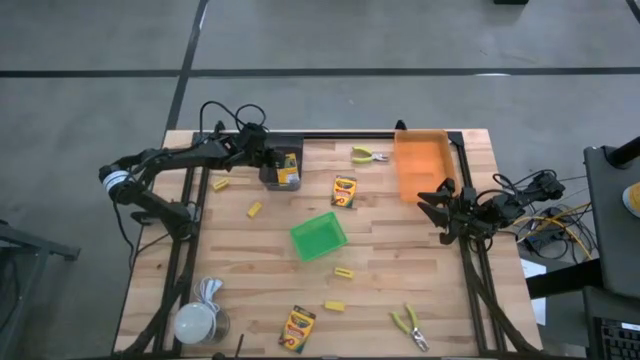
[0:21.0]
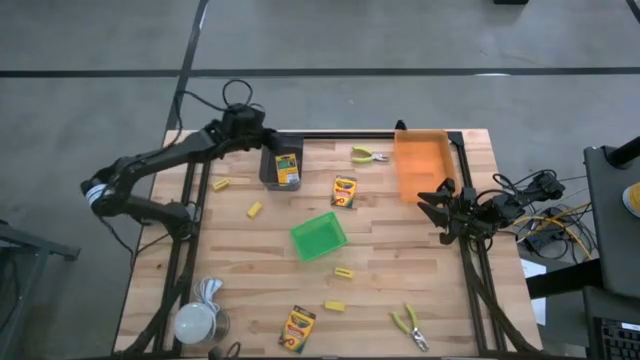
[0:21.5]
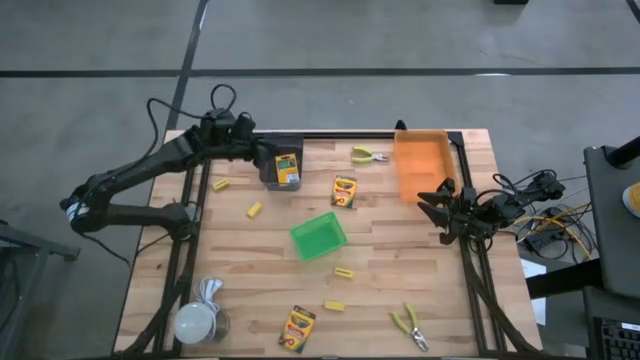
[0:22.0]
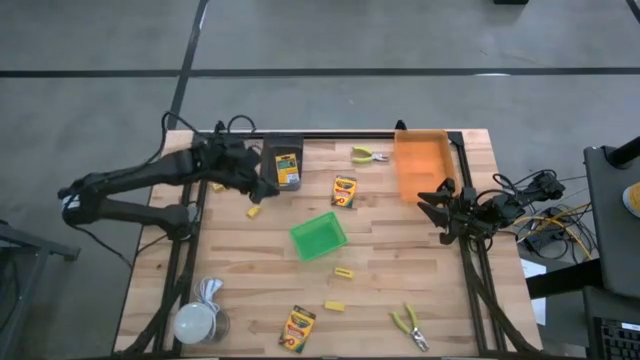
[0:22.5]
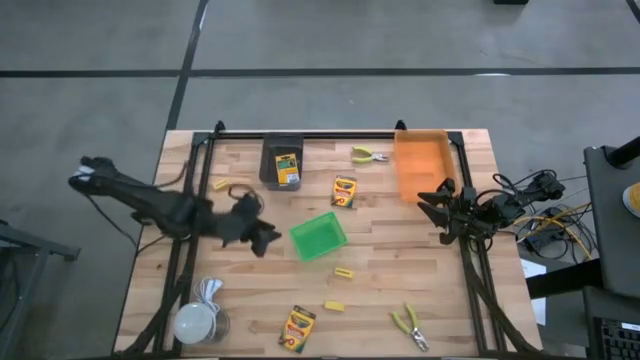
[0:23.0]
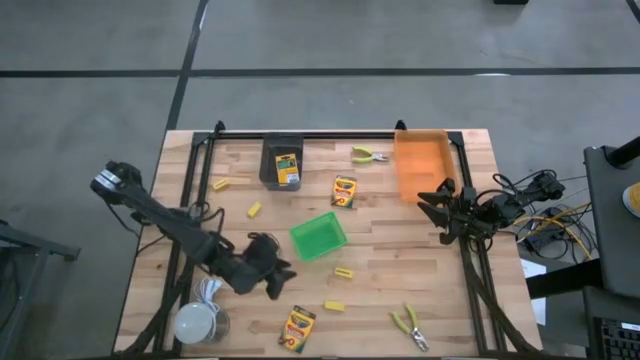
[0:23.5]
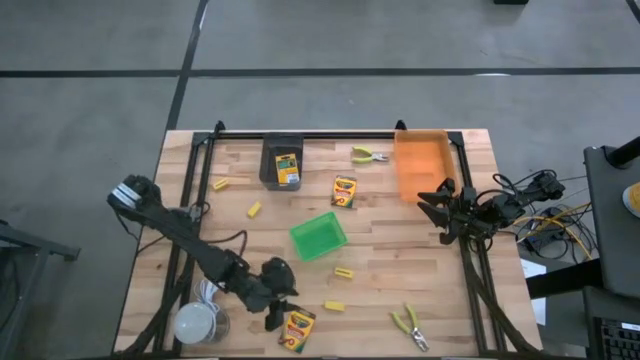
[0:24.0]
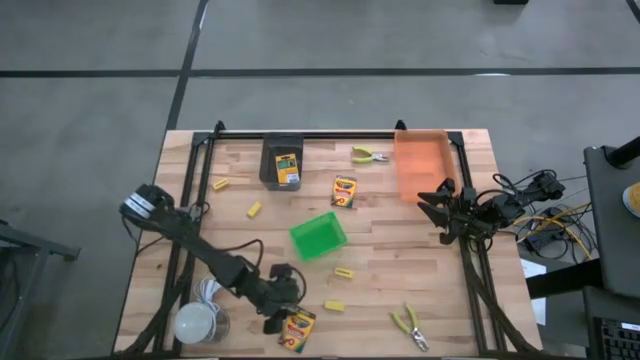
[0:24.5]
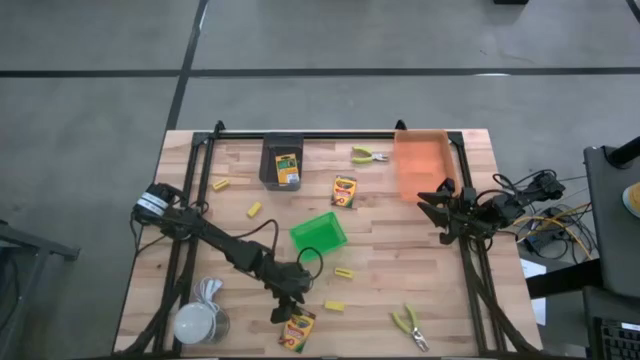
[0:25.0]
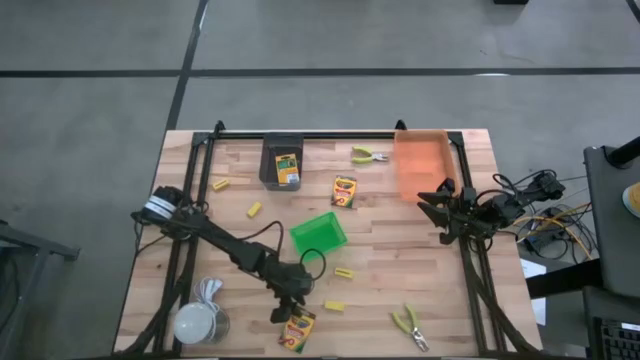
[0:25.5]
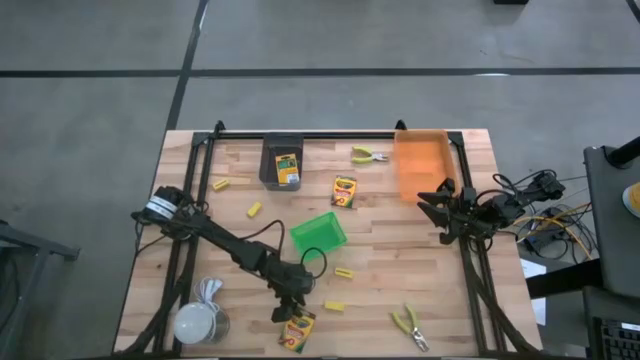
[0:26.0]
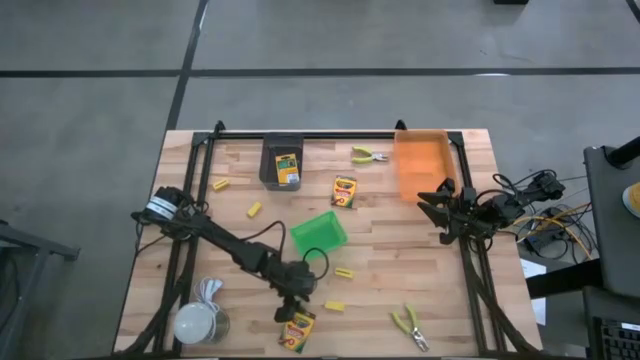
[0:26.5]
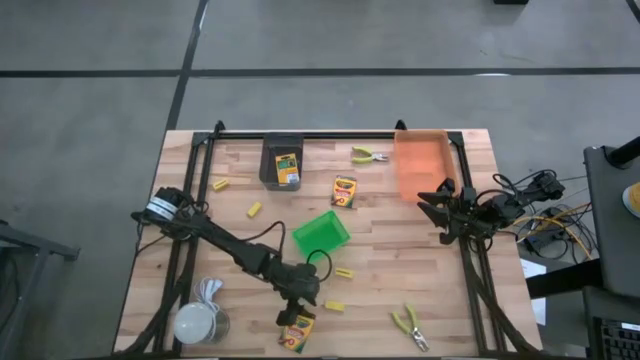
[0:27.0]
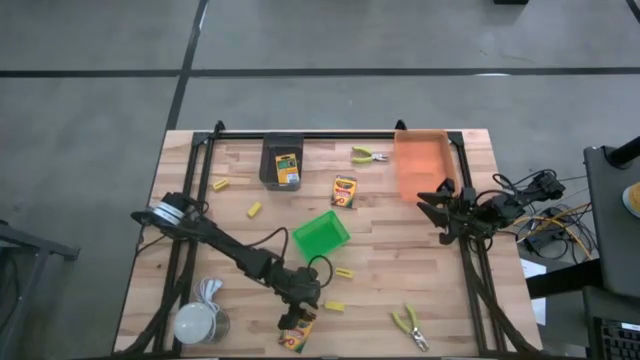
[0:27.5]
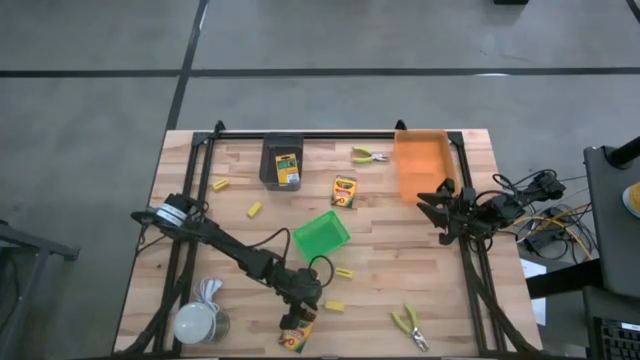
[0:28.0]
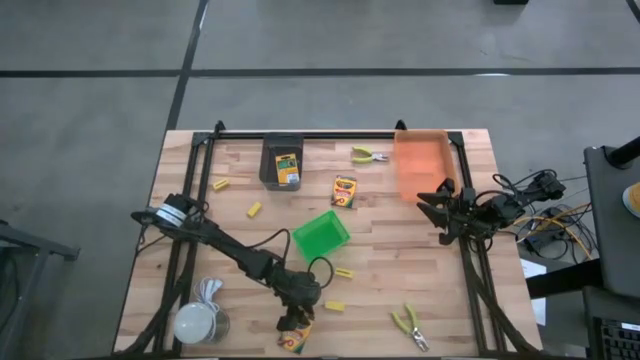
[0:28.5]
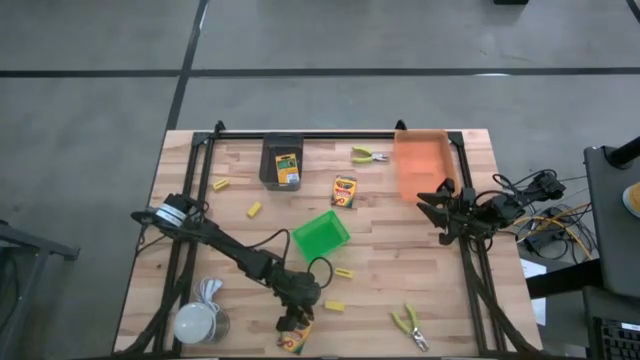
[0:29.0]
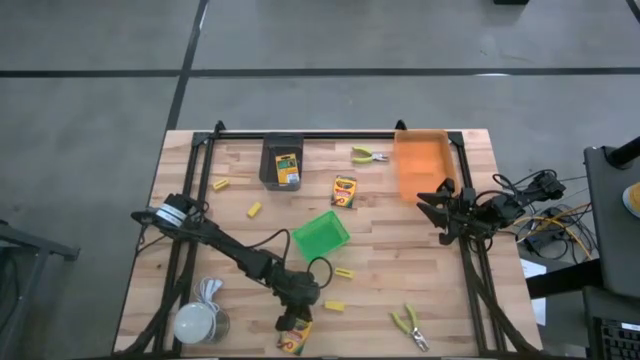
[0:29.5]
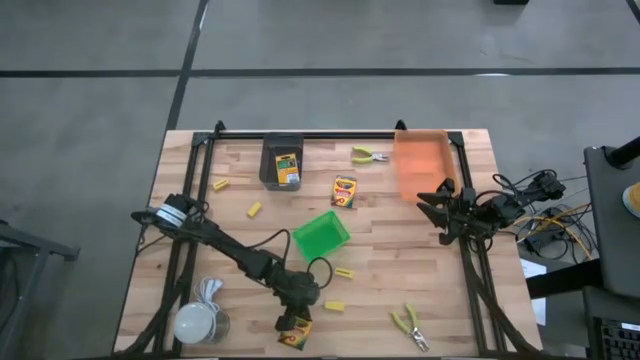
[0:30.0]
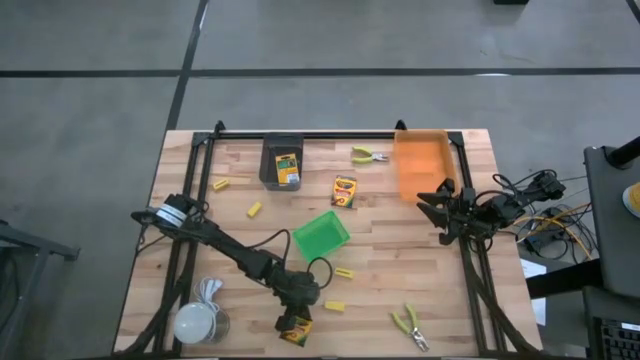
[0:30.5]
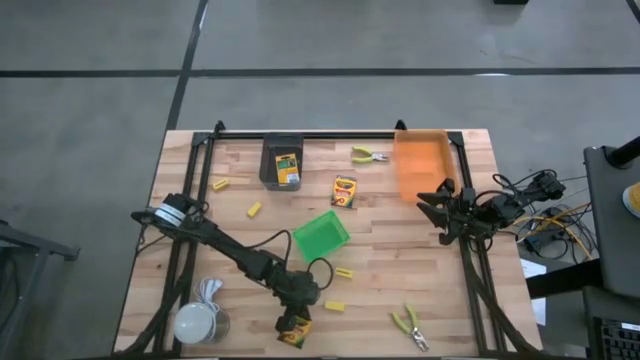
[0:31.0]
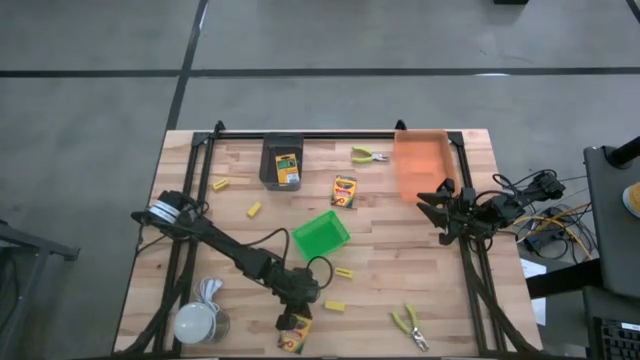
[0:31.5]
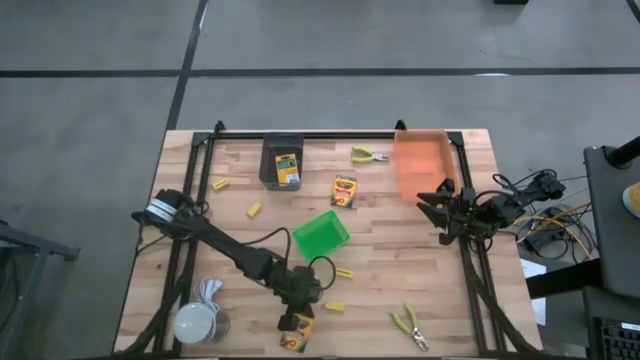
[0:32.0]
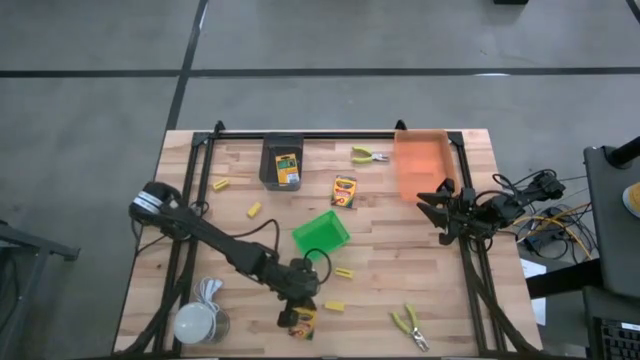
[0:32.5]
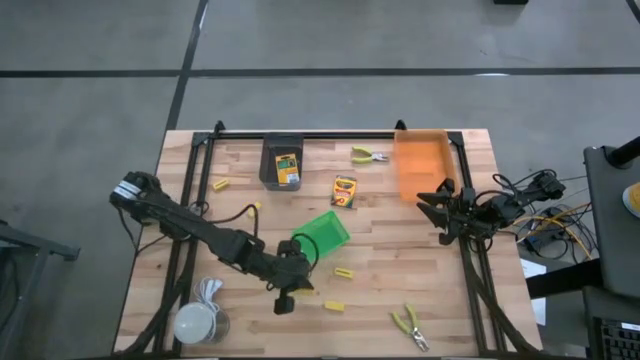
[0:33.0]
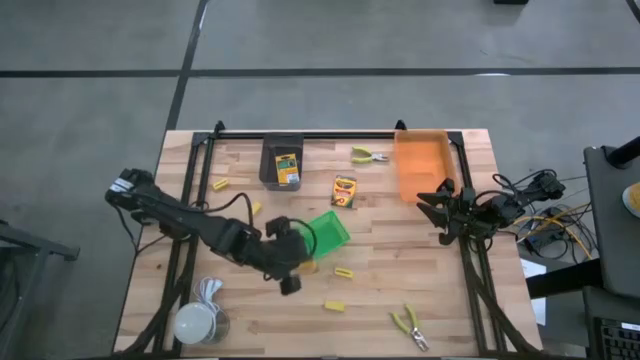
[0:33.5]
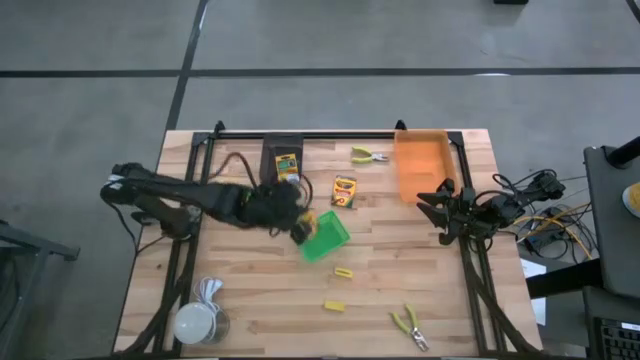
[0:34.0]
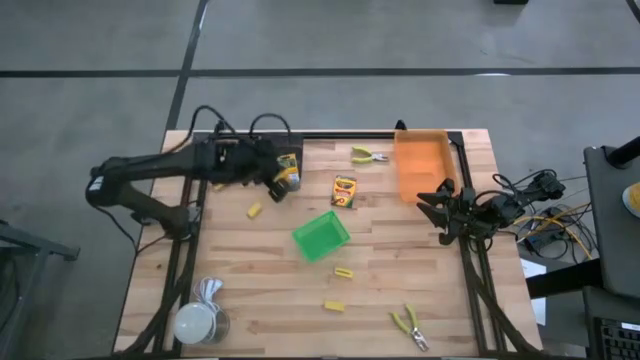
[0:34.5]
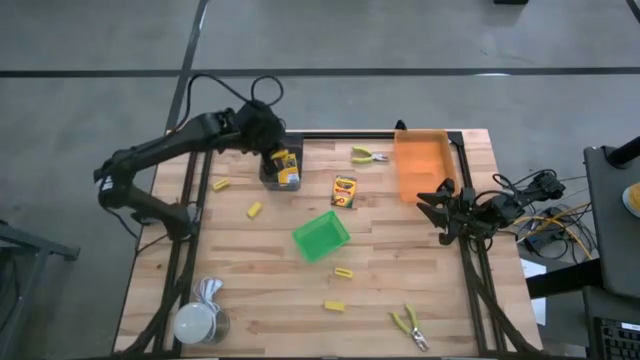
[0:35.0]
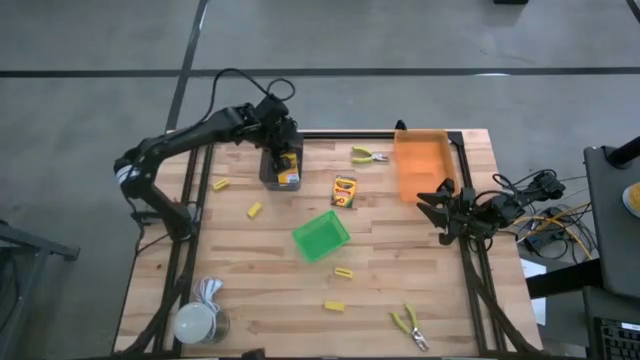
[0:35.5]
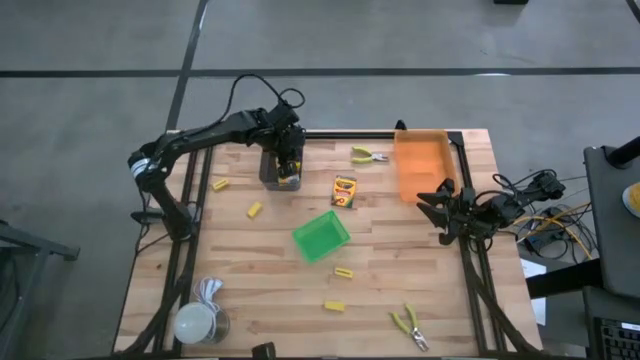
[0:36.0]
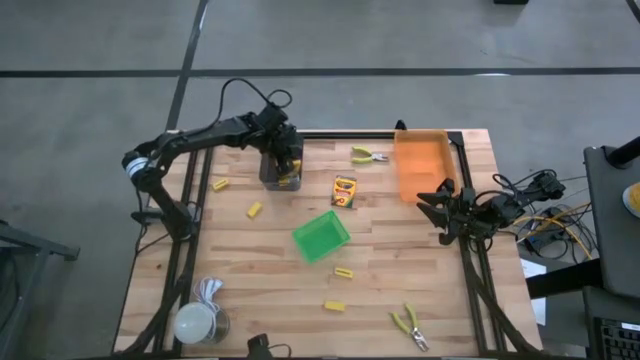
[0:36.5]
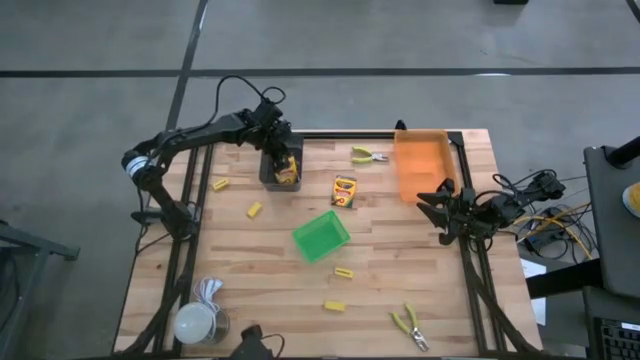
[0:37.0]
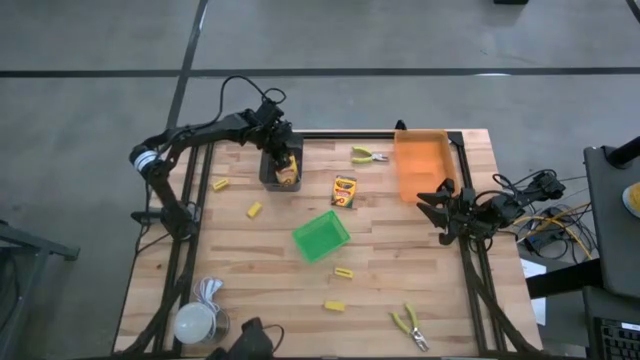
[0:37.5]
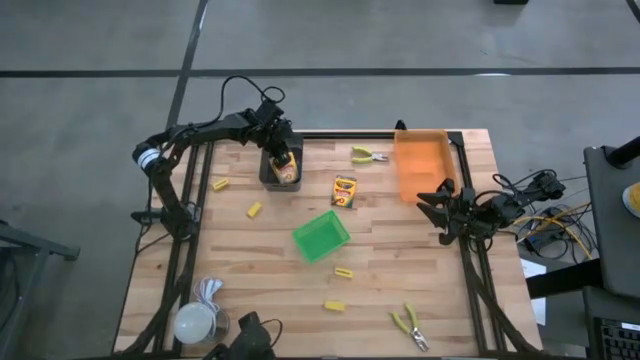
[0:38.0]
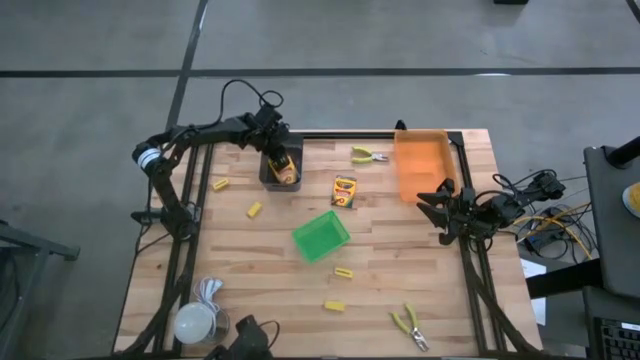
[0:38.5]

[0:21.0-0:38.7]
Task: Pick & Place School Supplies
Stack the bottom yellow crayon box on the yellow crayon box in the black bin
